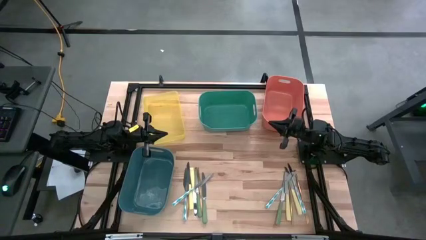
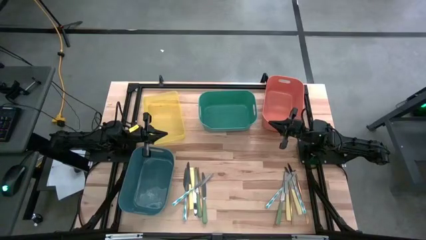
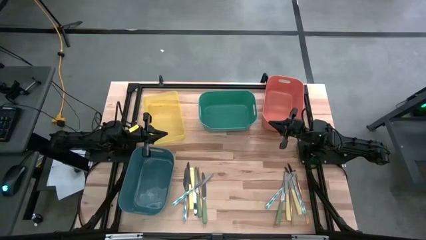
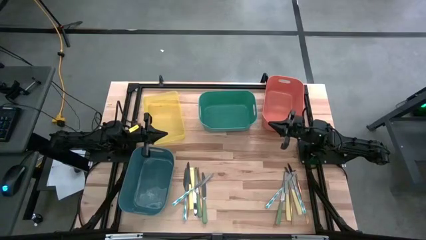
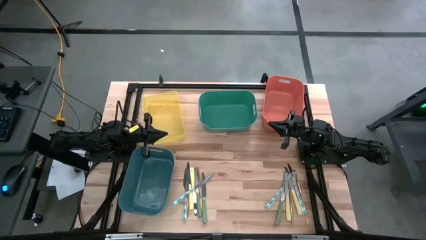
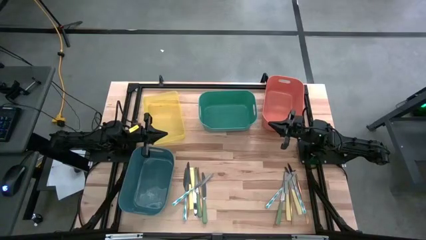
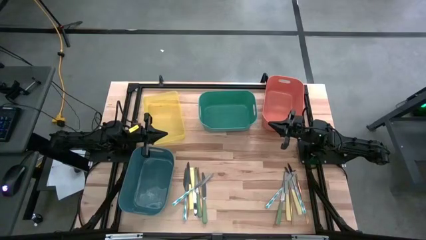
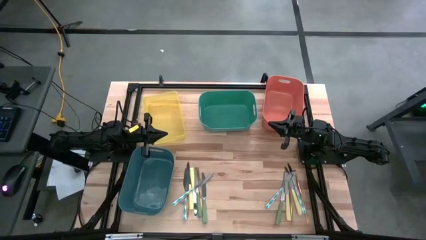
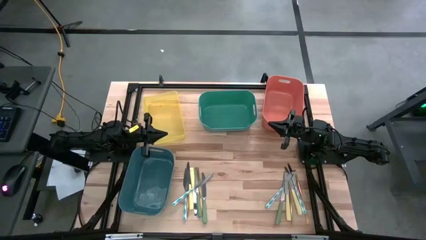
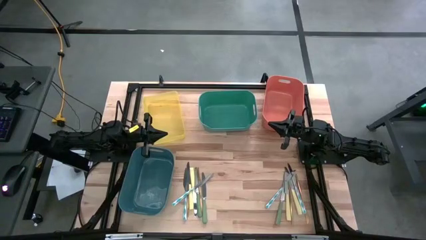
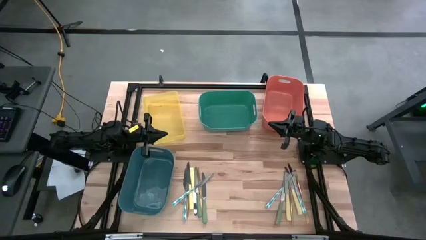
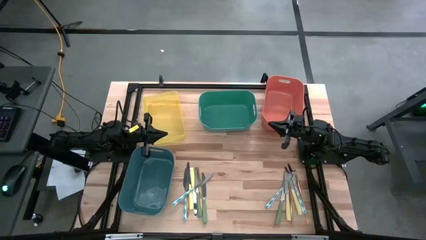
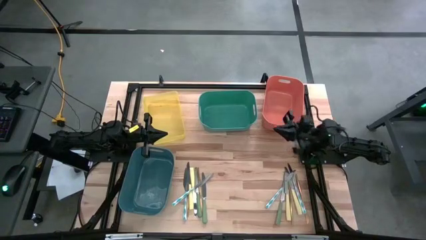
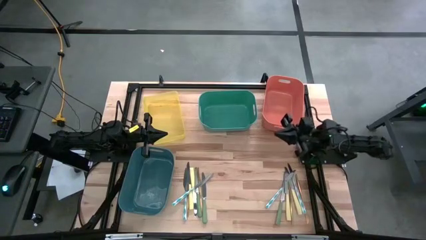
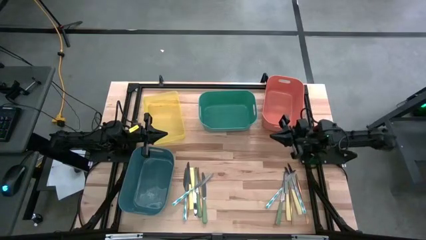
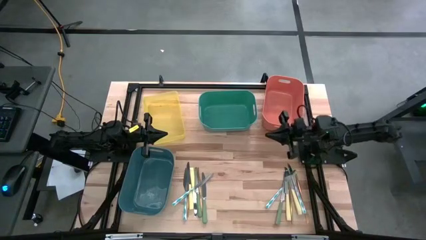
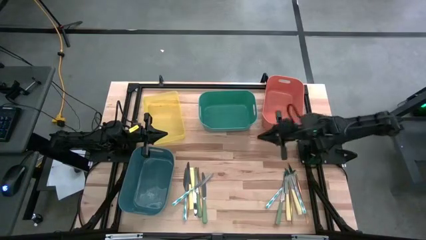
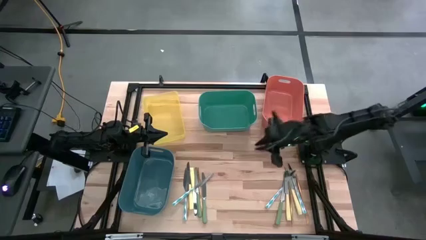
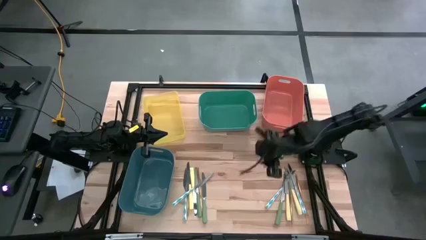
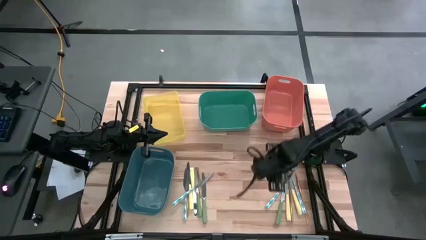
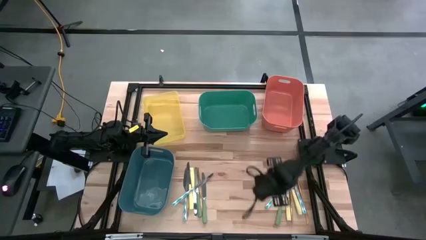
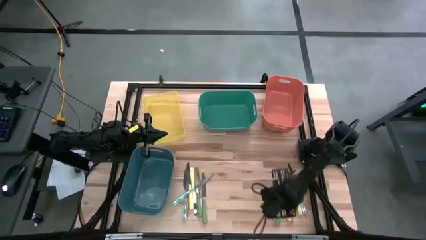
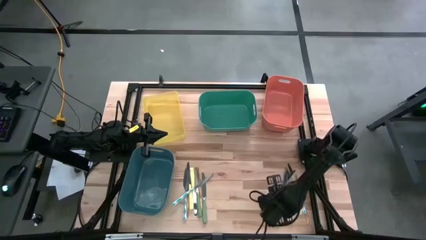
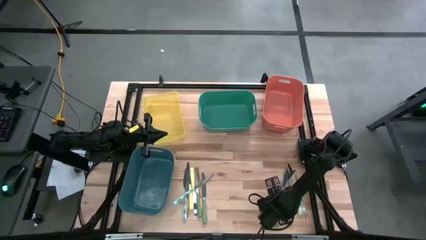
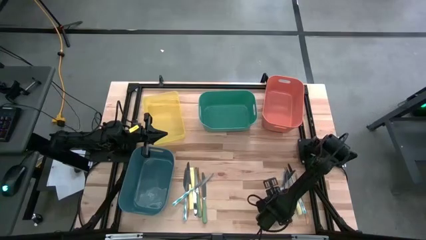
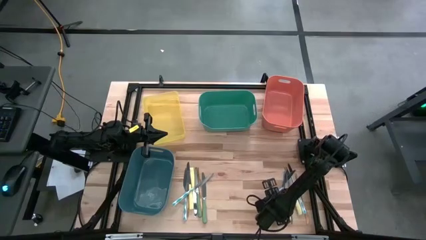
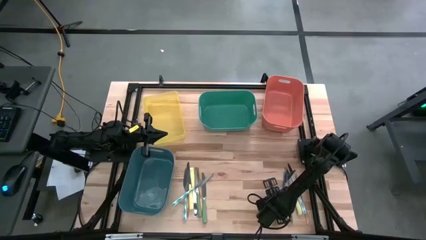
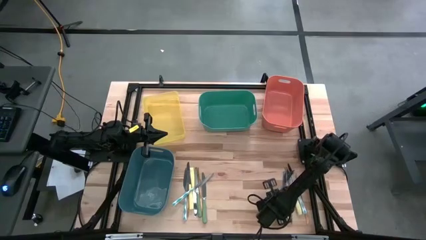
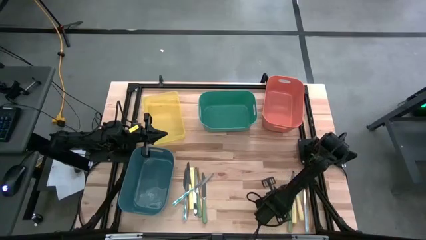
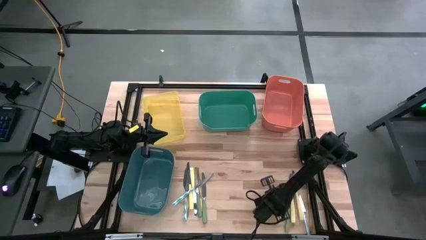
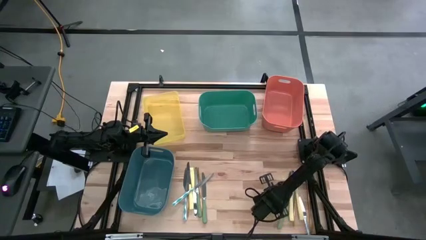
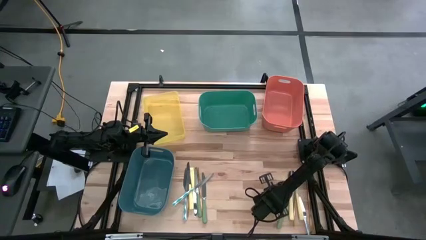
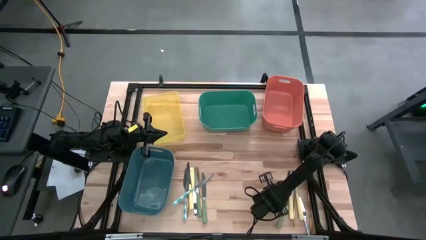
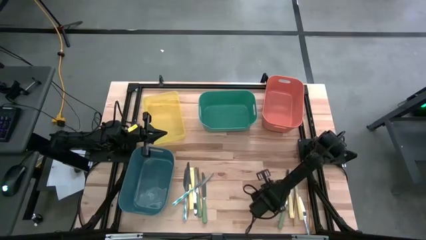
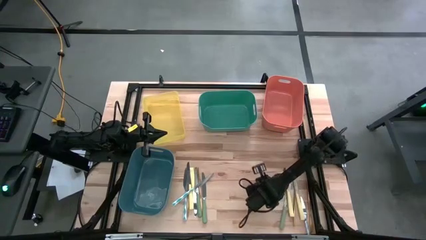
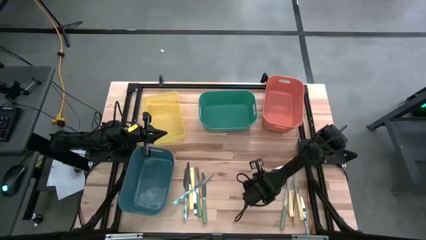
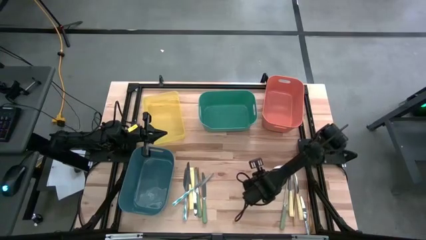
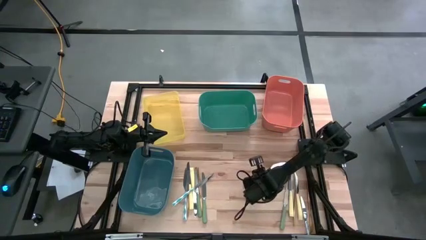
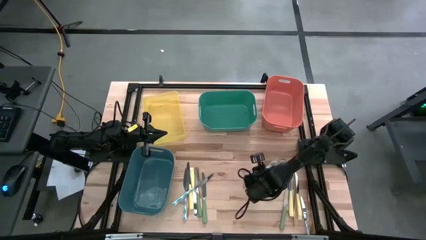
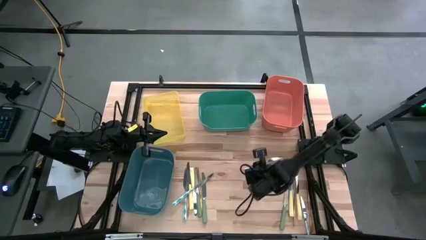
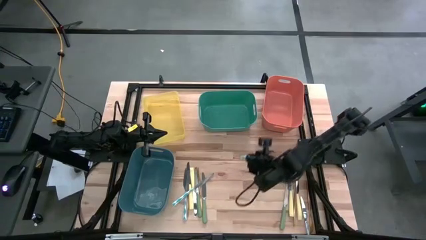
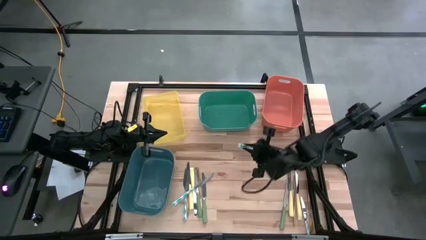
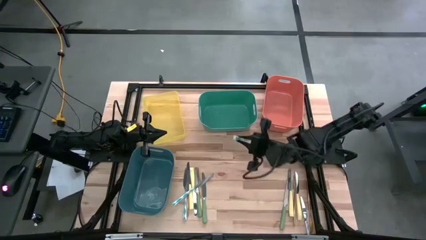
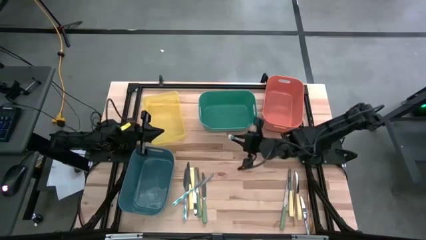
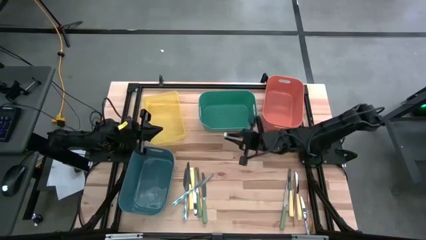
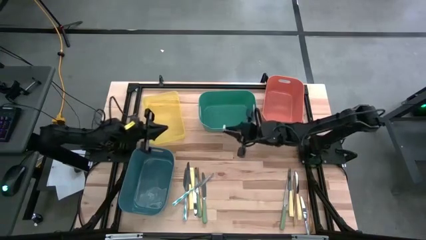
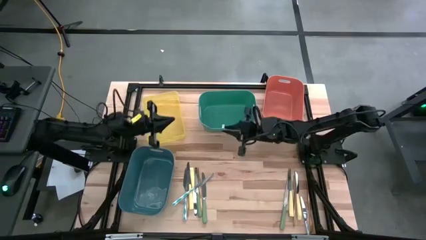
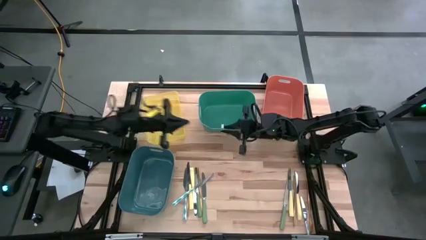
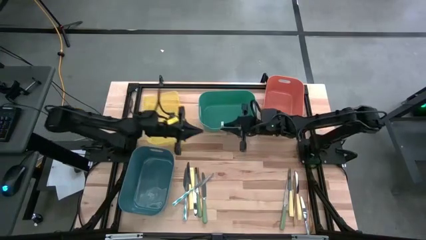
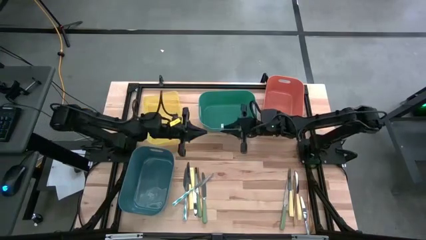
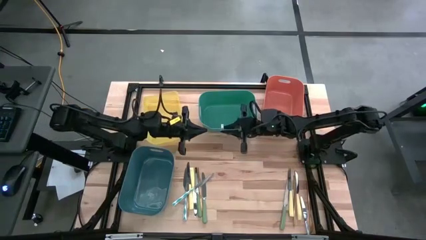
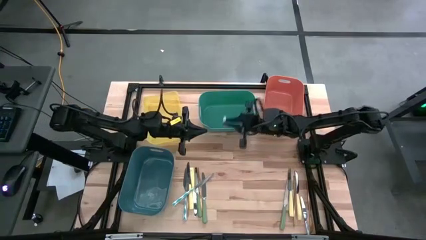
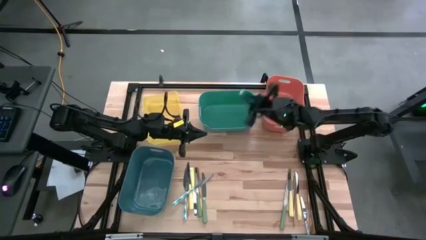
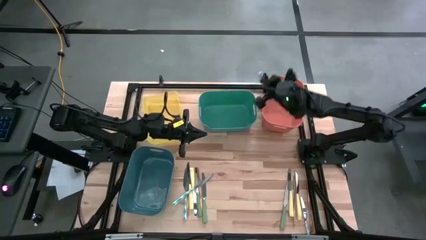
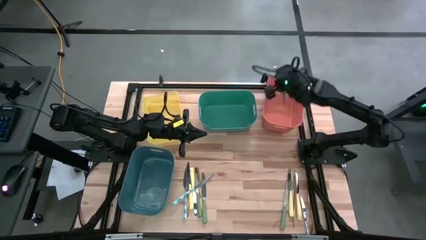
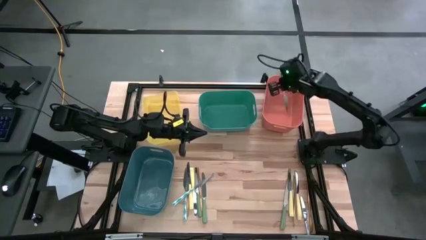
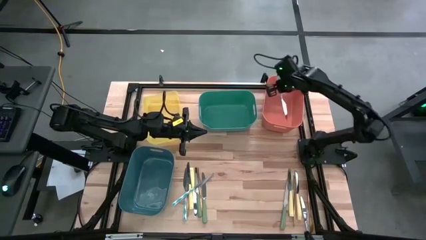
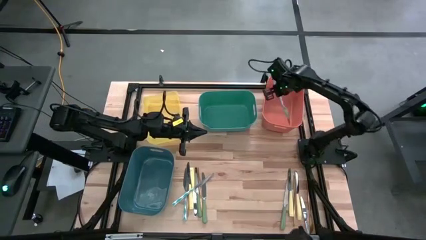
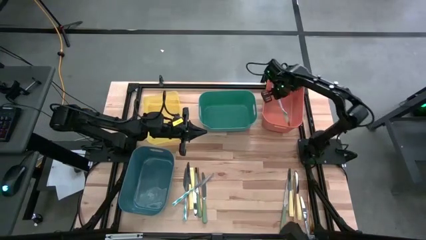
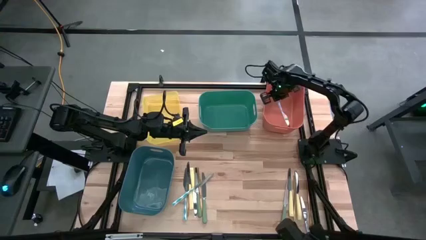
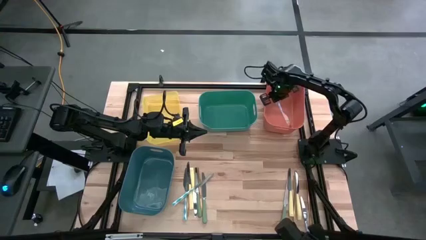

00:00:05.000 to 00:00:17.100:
Task: Sort silverware by color (type)
Put the blue patterned knife into the orange bin
